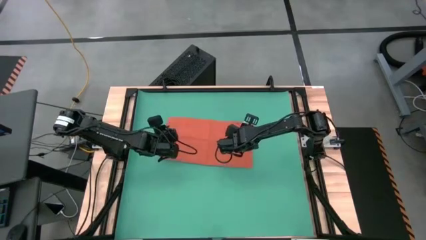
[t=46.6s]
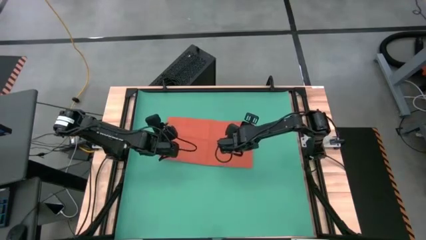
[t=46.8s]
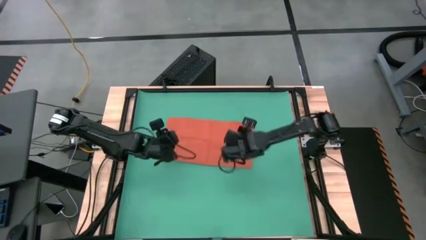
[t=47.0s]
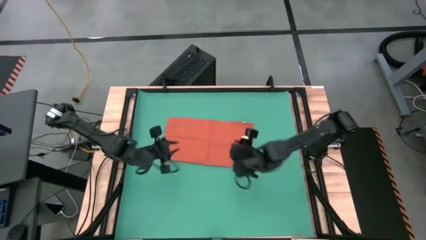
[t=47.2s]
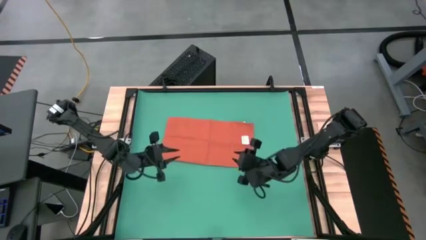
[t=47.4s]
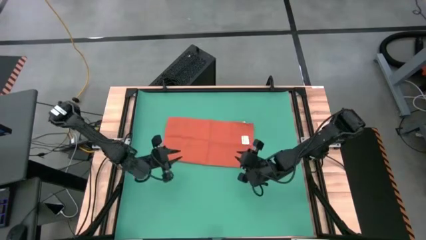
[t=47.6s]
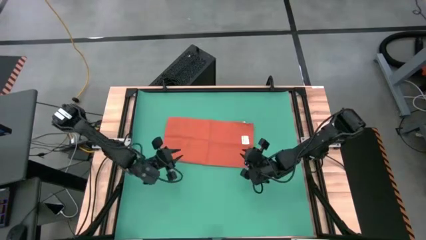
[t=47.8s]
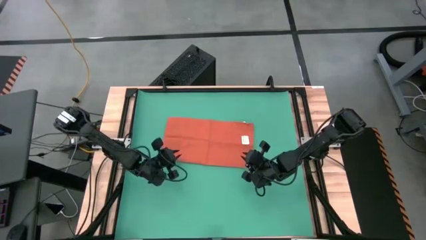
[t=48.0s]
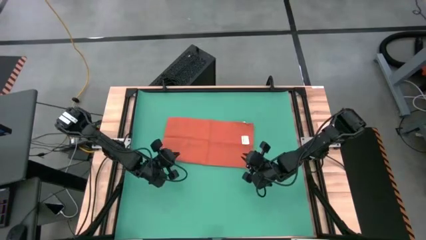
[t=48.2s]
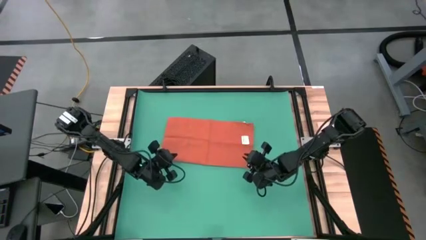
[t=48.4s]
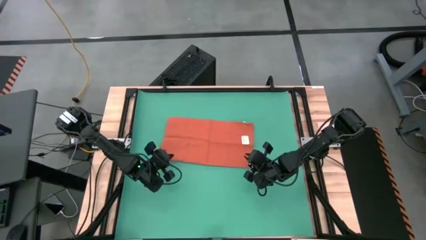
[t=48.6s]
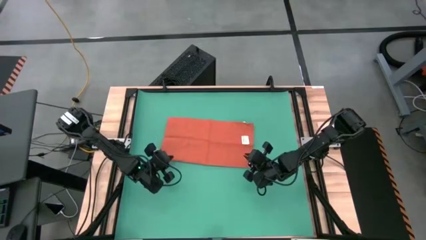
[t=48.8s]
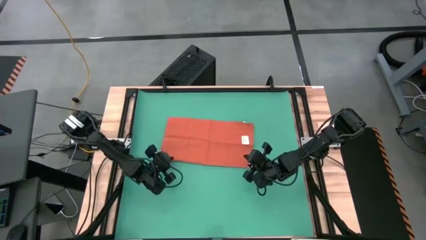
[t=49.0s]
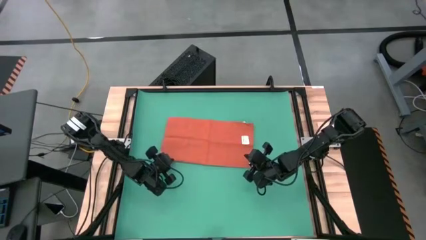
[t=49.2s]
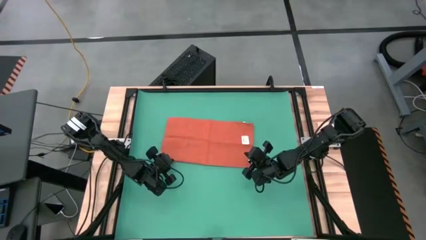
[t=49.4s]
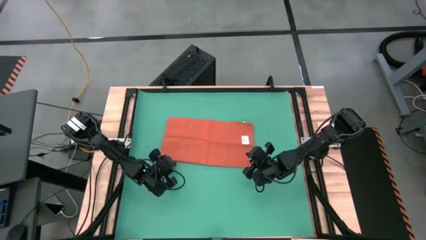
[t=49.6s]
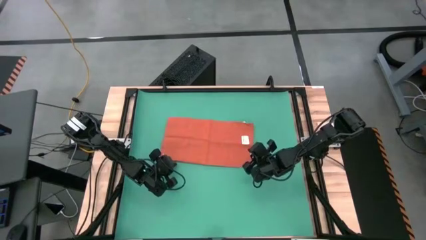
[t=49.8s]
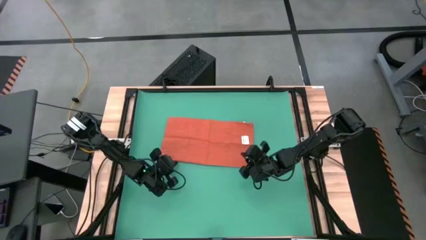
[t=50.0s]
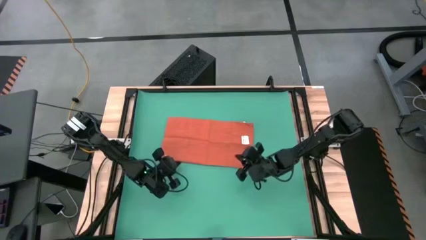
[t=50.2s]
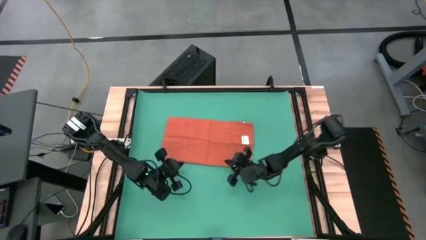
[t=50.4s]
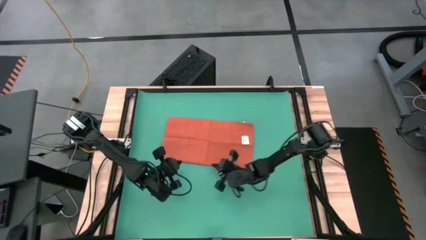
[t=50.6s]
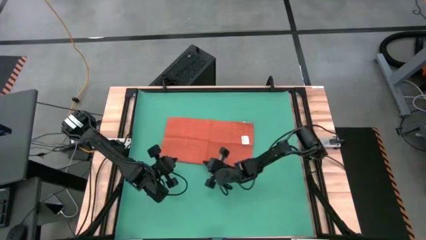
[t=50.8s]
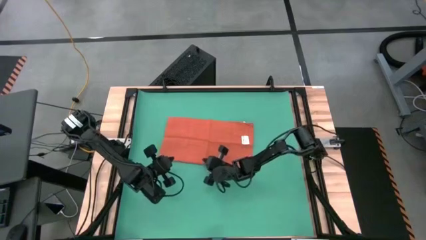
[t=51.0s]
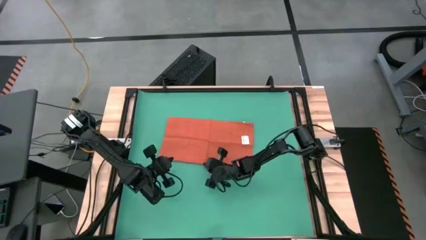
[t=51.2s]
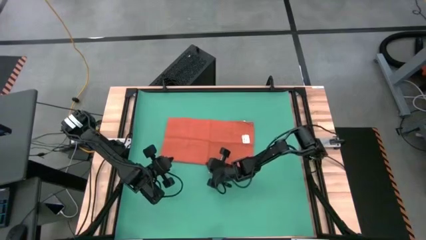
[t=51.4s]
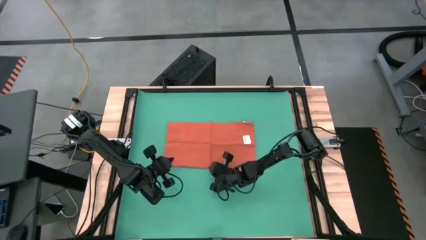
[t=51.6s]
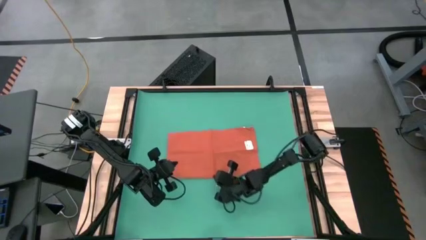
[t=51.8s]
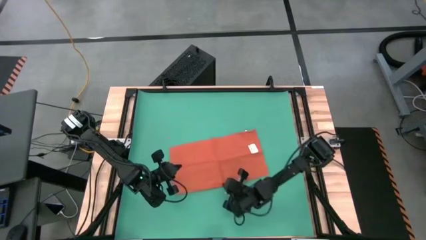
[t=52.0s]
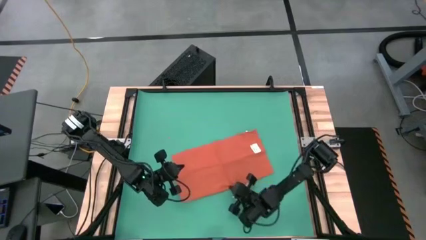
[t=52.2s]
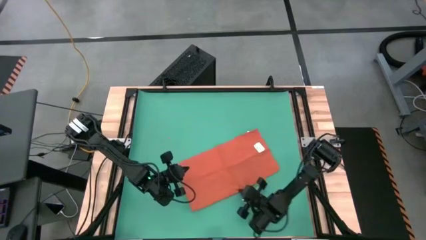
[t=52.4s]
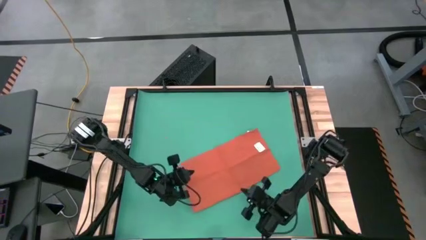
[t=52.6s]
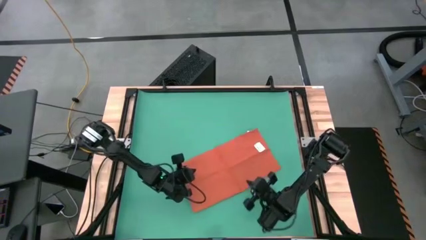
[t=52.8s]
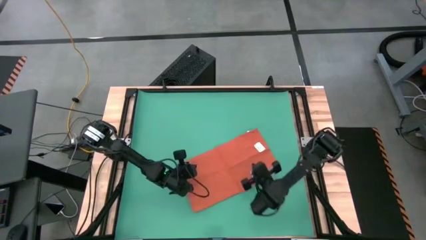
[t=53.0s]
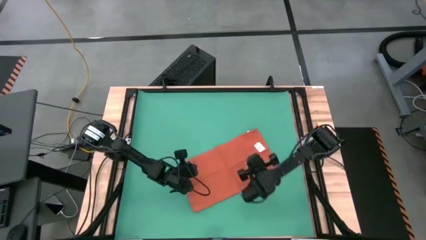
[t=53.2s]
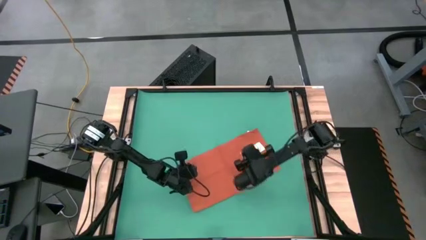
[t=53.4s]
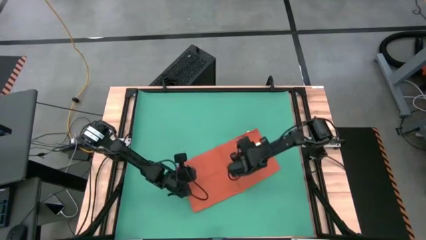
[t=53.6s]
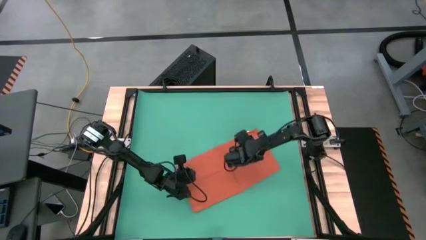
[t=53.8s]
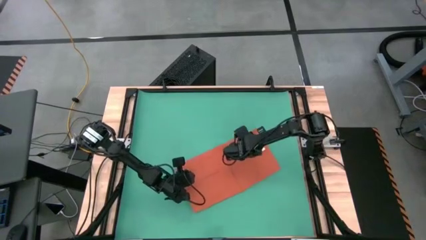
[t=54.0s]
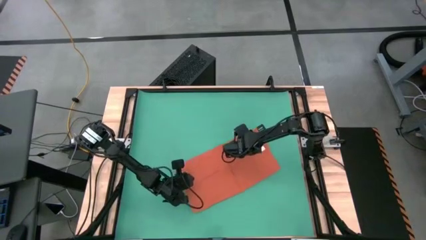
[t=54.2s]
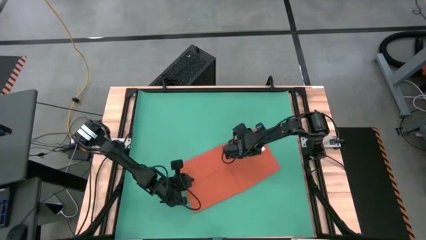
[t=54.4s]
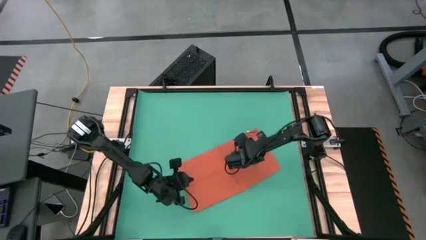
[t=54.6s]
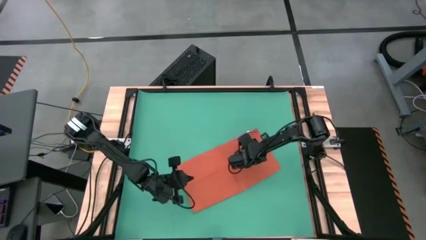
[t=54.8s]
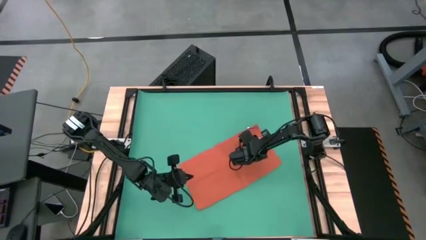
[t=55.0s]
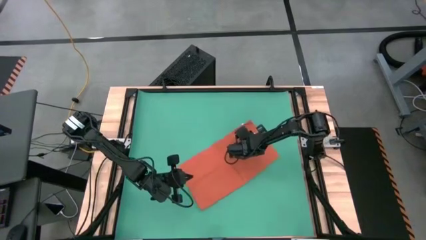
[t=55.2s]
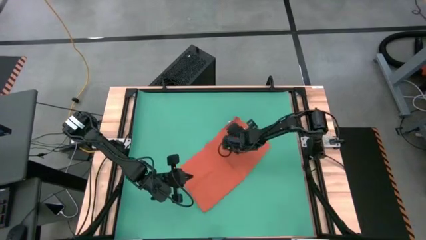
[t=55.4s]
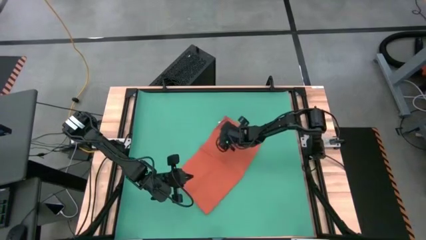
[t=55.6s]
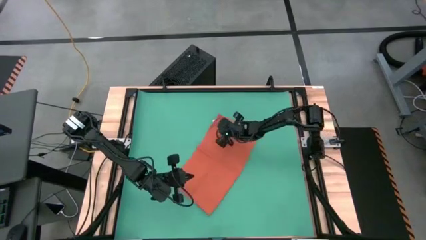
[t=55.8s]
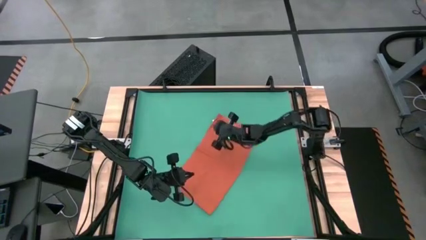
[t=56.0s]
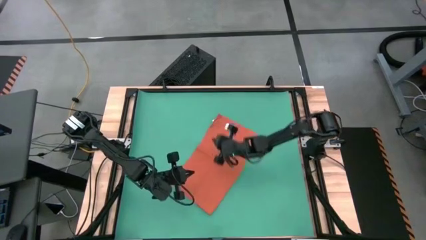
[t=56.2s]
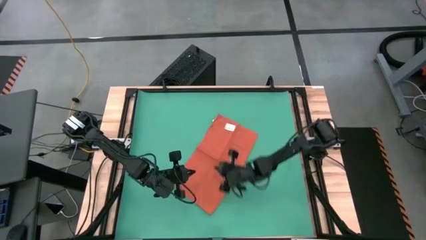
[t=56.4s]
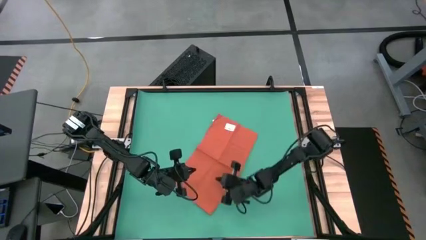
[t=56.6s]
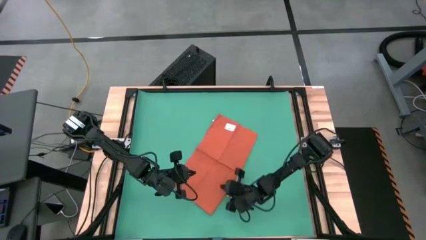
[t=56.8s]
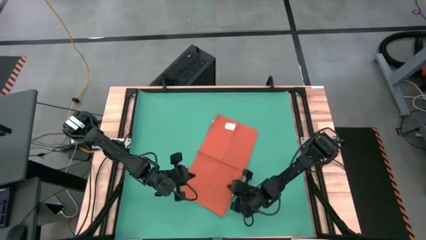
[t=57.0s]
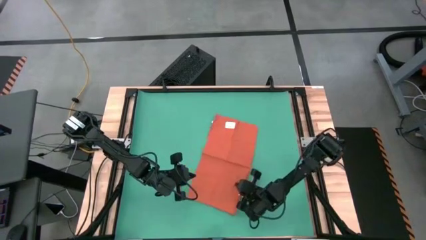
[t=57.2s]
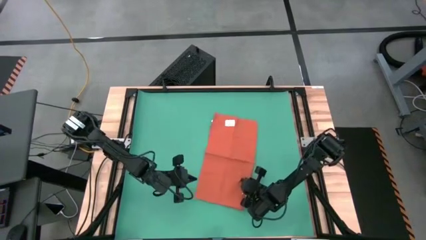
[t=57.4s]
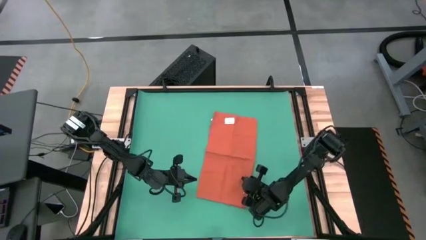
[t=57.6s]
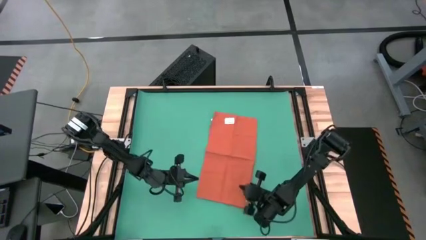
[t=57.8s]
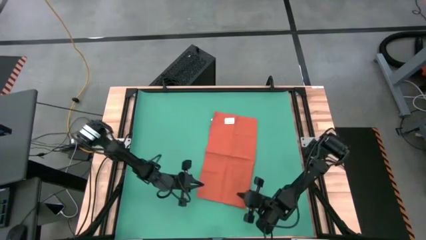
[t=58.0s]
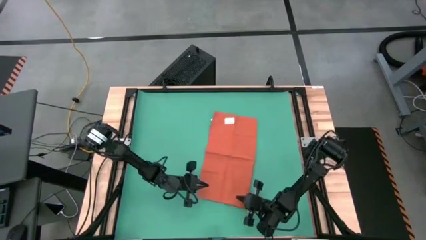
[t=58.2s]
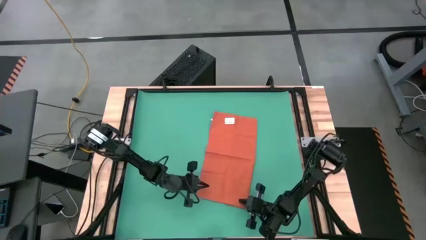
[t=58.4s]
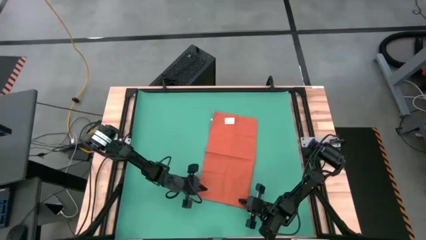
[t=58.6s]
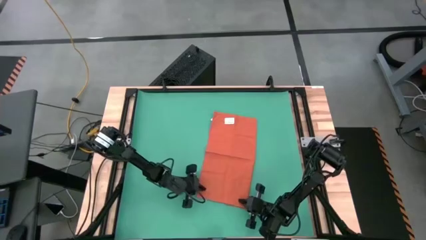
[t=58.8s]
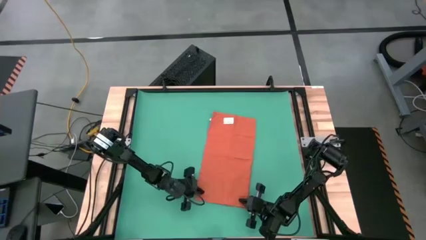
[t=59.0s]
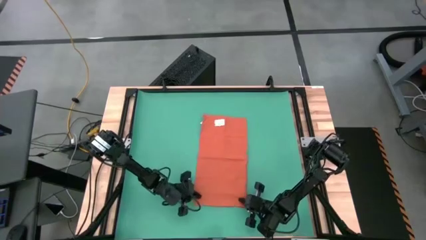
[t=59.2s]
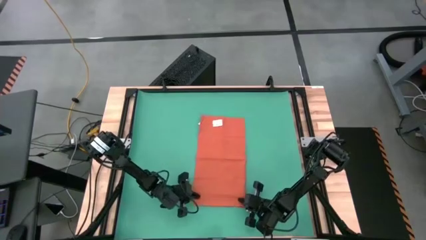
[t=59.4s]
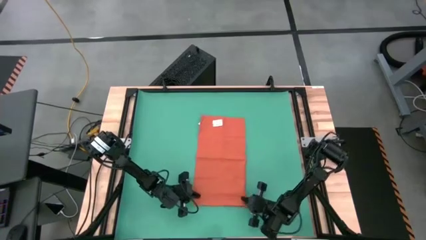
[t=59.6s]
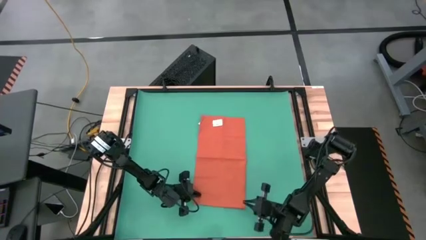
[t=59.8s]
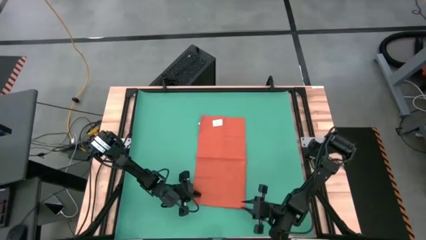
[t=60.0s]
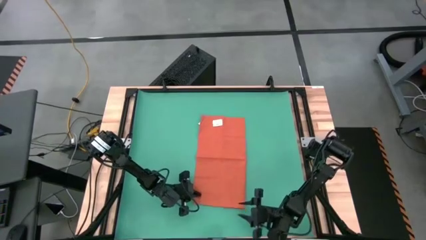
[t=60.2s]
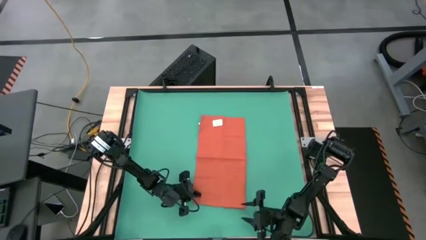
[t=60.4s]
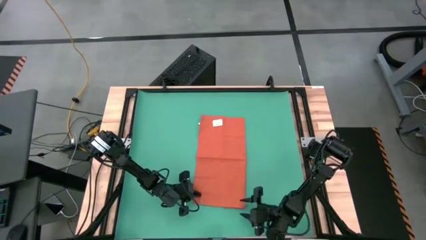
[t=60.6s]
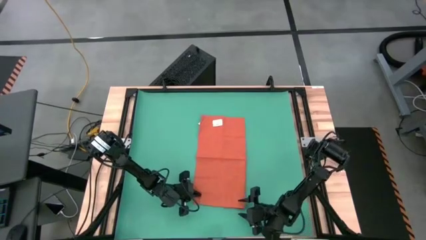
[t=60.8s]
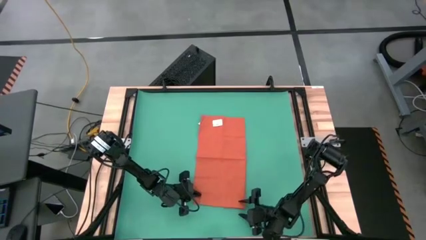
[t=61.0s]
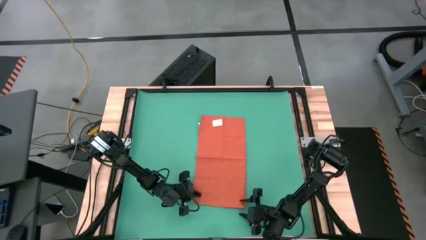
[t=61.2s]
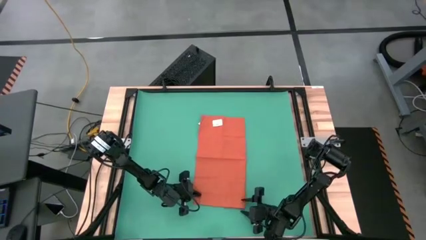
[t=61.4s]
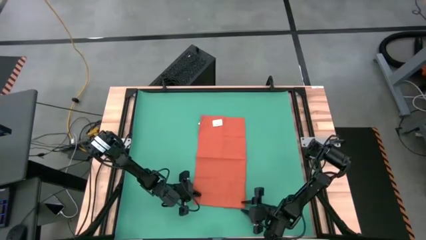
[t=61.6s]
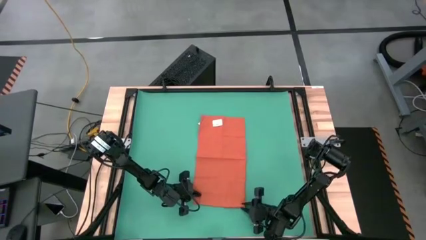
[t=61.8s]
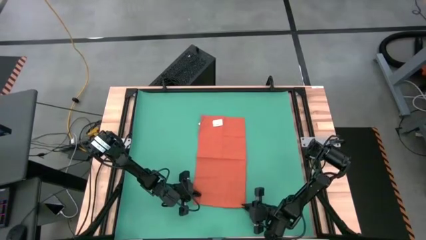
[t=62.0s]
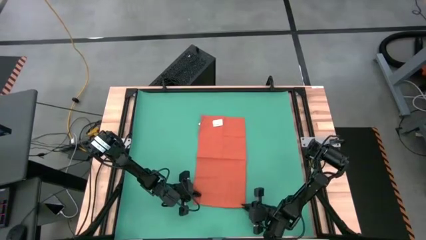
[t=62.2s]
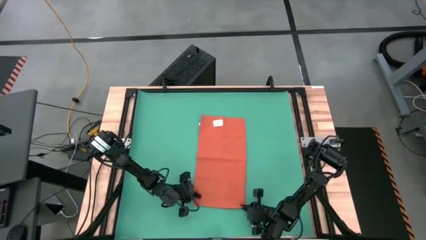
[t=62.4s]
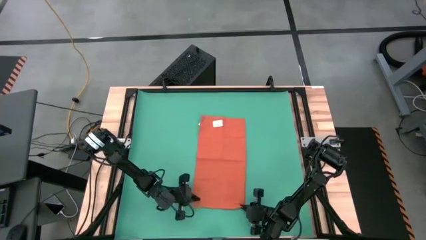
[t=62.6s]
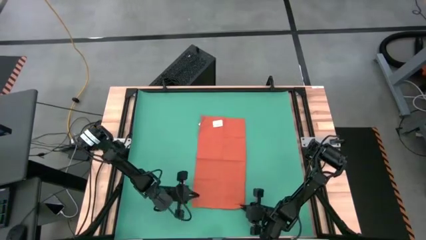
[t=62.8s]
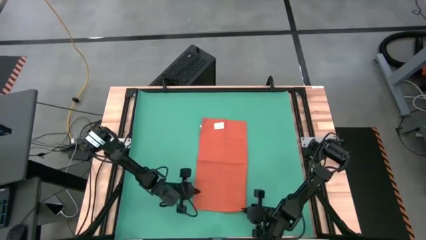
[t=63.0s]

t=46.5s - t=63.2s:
Task: Roll towel into tight, uniform cylinder
Roll the orange table napkin
